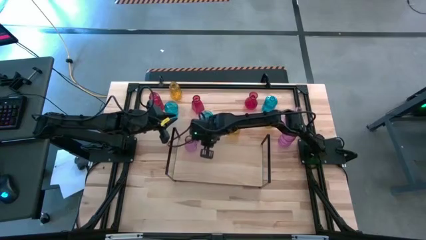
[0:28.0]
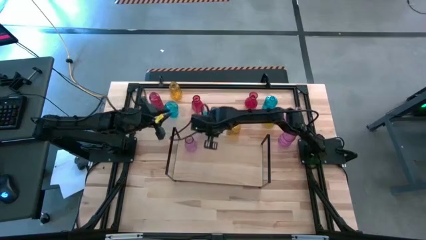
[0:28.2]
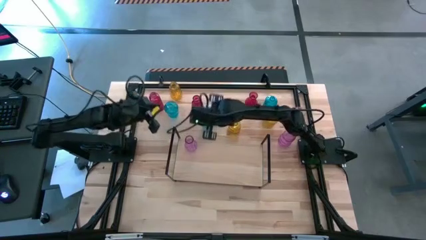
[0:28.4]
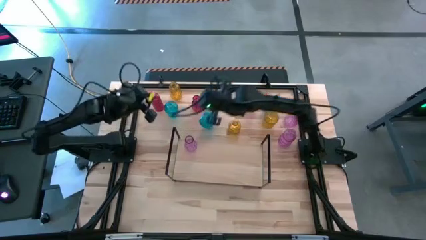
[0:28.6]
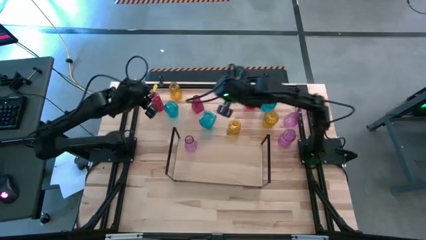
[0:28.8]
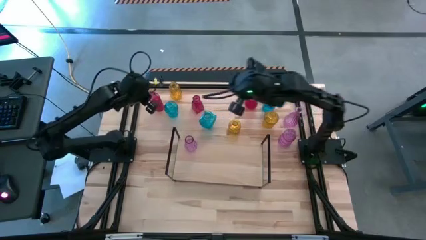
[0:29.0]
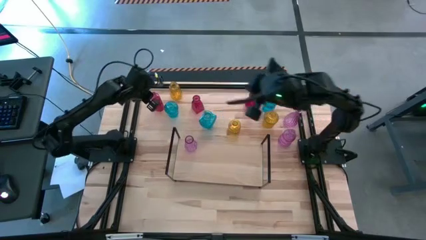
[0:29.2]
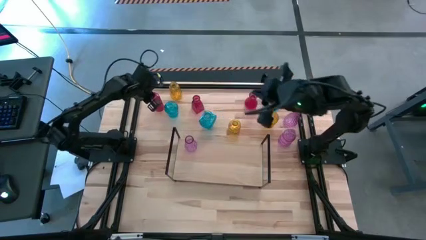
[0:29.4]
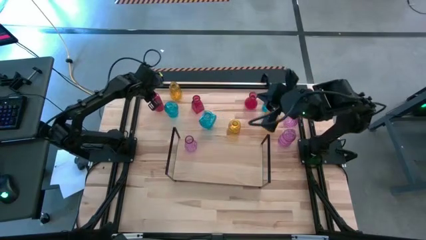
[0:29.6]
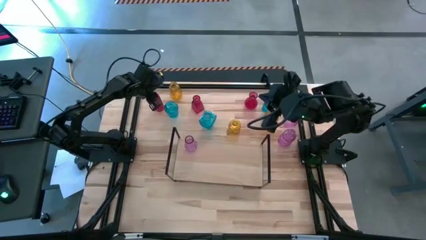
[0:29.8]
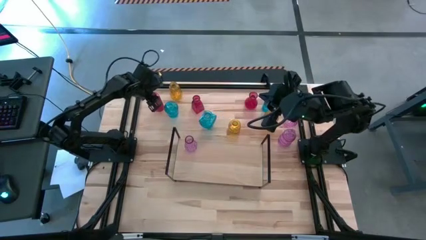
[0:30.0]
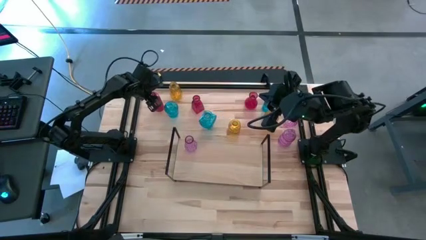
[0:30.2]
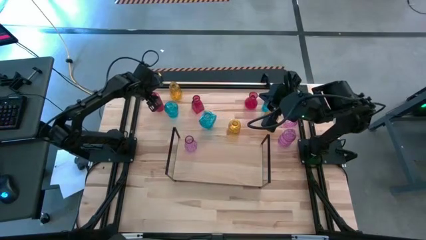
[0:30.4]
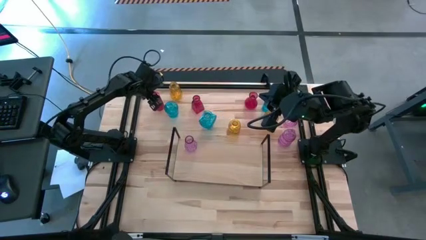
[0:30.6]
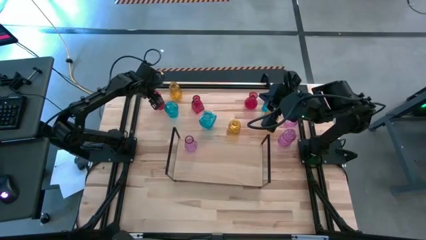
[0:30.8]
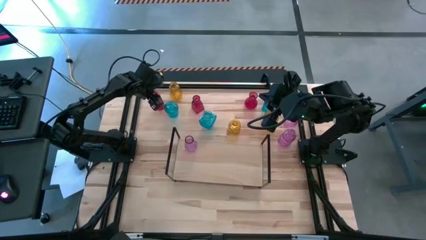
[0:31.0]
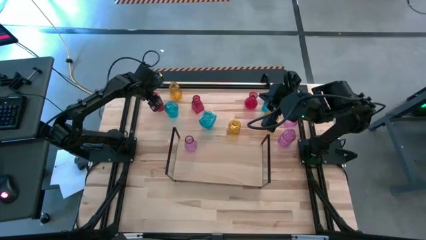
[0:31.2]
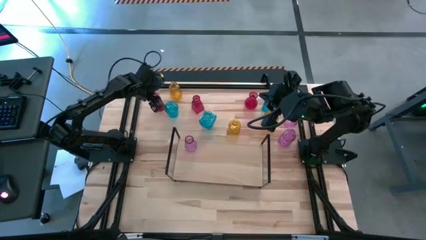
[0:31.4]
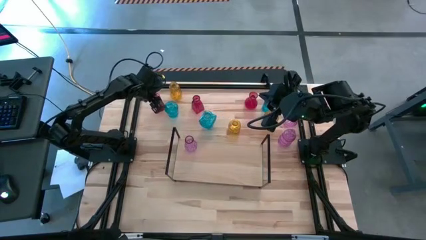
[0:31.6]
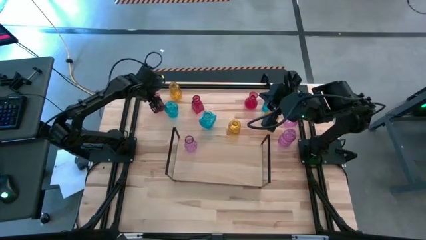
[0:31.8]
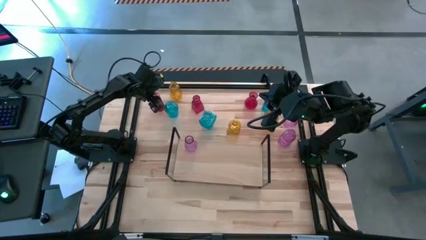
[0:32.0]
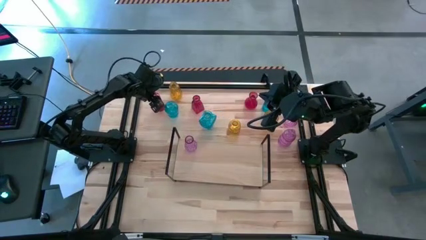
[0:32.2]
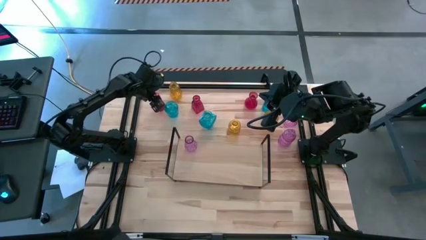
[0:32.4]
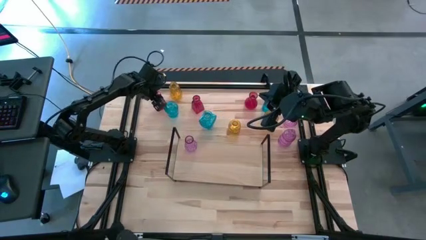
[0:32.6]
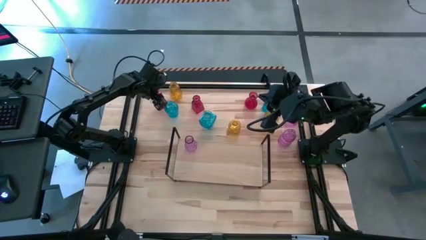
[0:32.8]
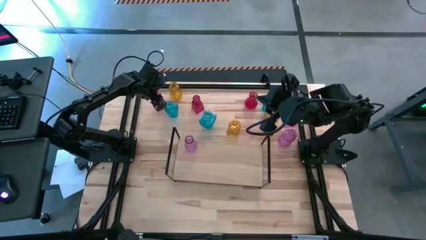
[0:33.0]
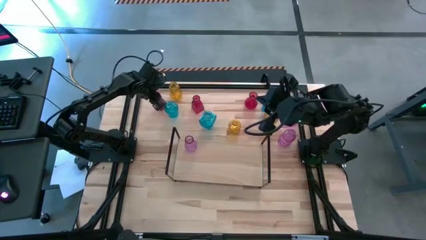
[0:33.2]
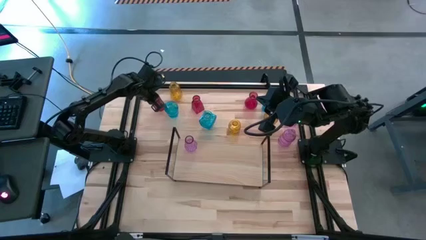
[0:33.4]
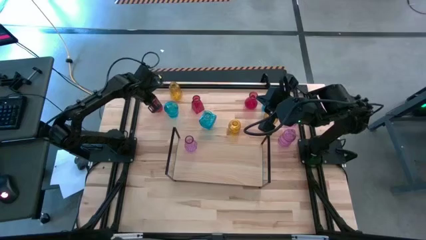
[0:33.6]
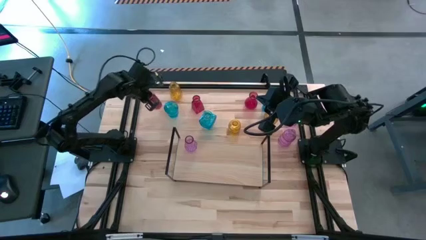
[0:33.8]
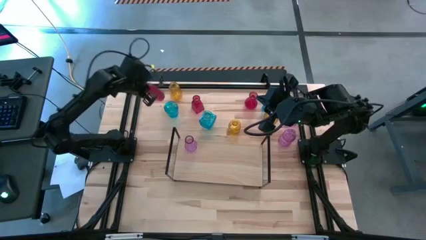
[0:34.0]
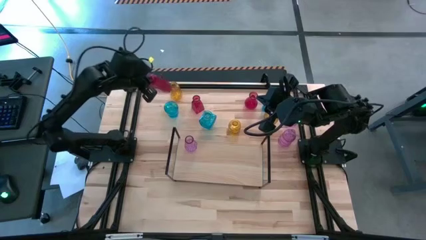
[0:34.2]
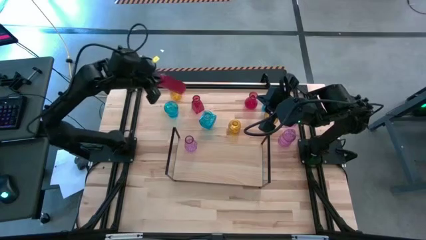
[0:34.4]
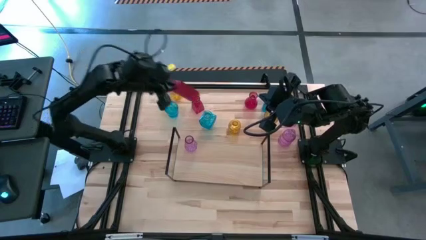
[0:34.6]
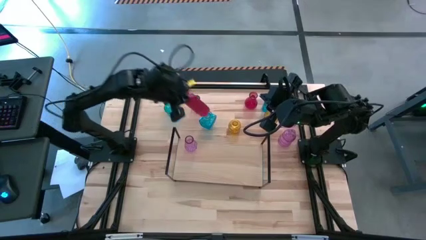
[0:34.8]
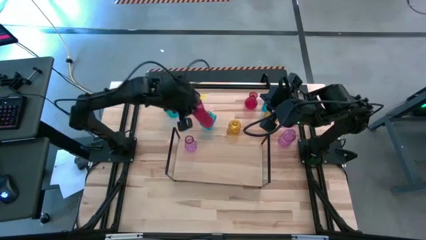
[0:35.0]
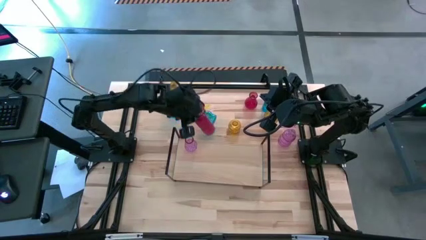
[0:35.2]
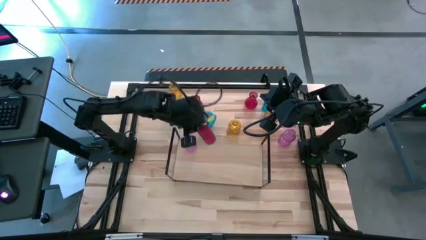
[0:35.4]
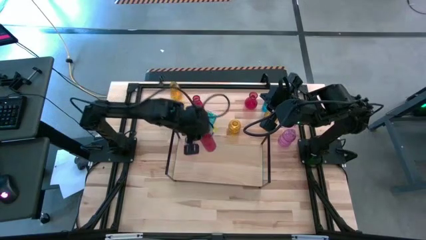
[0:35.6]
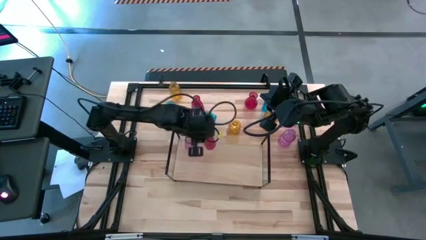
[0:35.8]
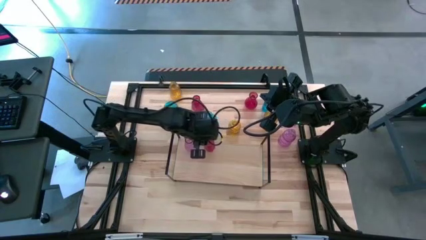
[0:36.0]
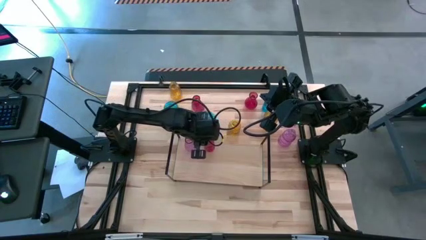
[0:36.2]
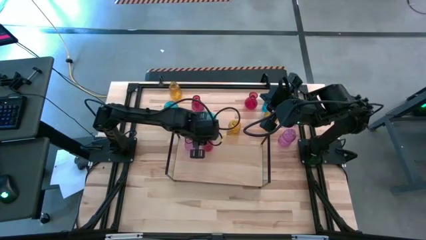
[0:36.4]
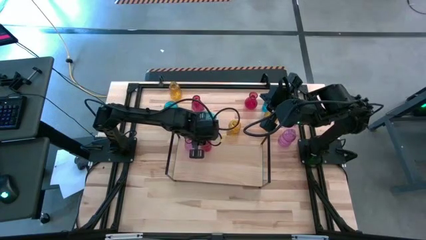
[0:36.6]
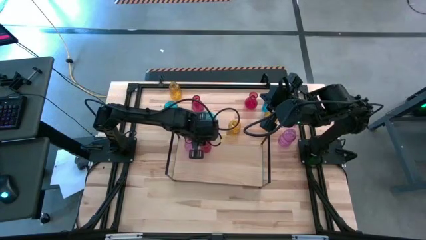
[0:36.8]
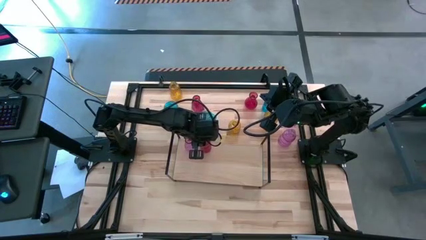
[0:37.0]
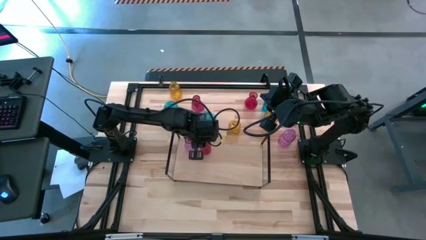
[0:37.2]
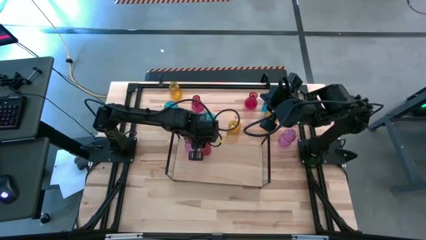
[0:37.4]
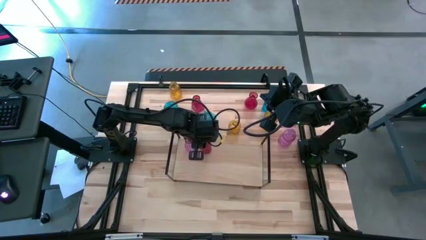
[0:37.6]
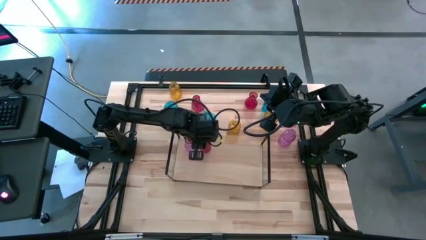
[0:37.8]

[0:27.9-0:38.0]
Task: sort vases onto shelf
Put the left red vase on the shelf

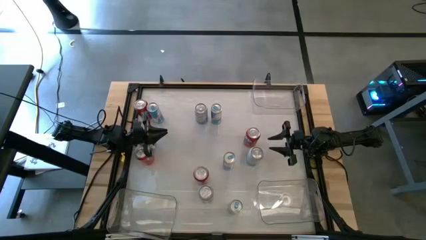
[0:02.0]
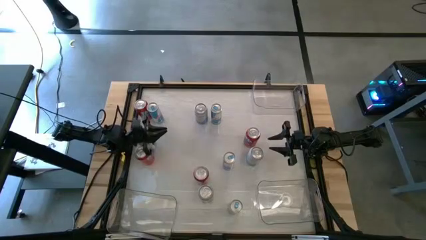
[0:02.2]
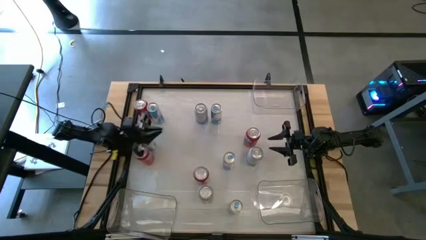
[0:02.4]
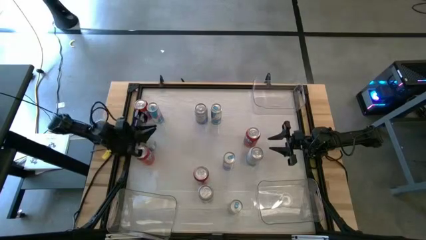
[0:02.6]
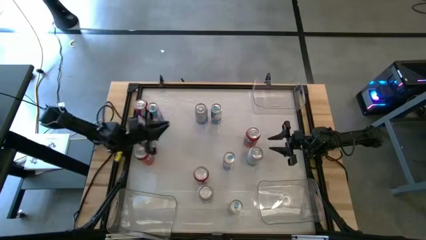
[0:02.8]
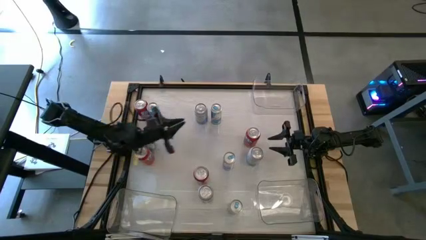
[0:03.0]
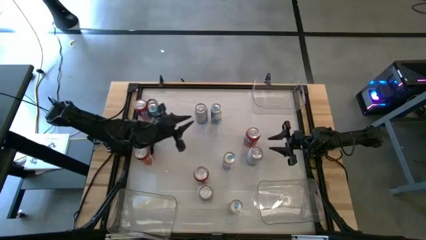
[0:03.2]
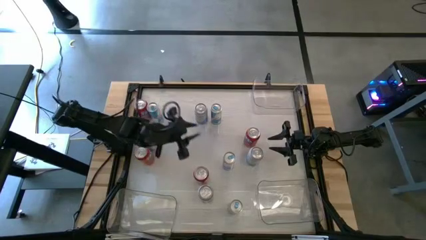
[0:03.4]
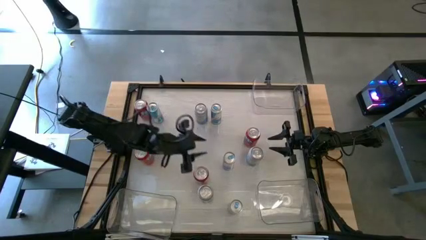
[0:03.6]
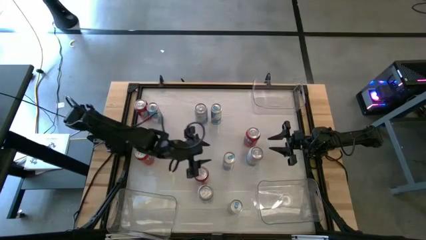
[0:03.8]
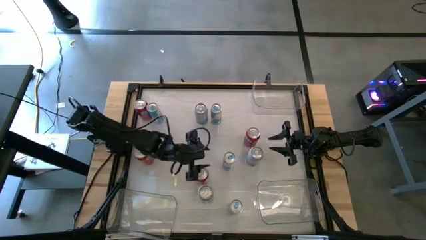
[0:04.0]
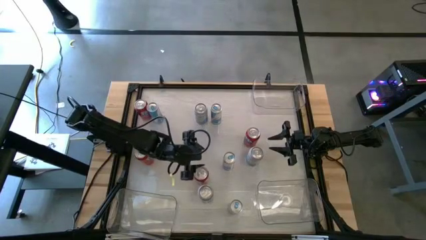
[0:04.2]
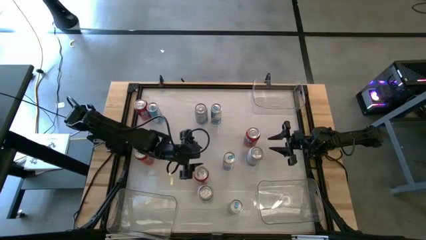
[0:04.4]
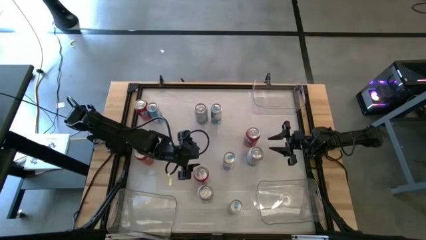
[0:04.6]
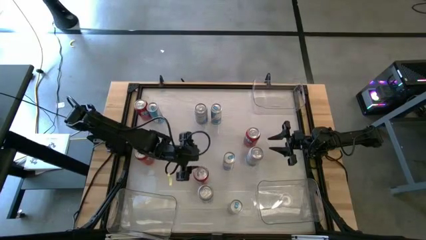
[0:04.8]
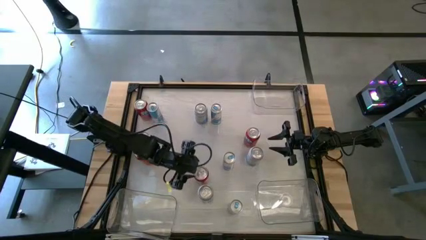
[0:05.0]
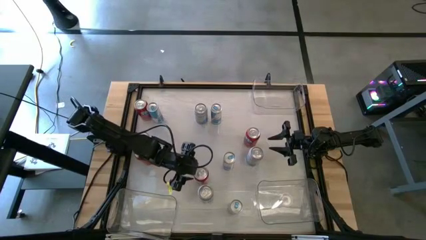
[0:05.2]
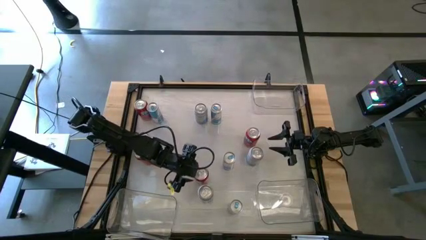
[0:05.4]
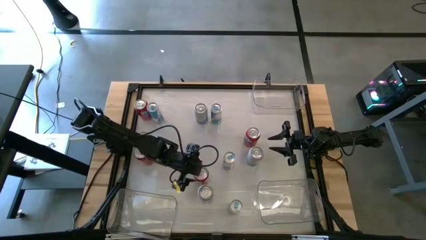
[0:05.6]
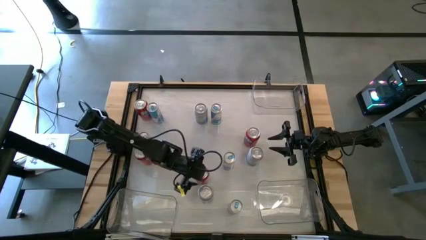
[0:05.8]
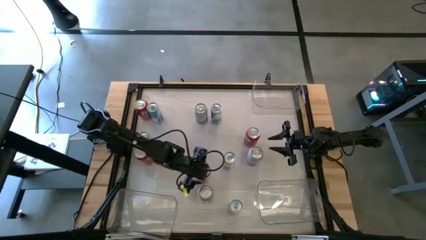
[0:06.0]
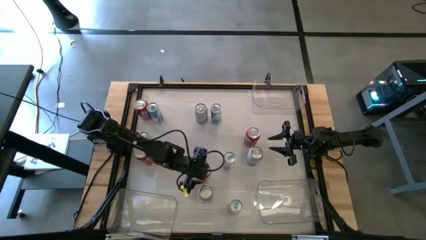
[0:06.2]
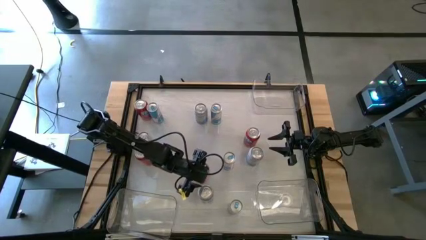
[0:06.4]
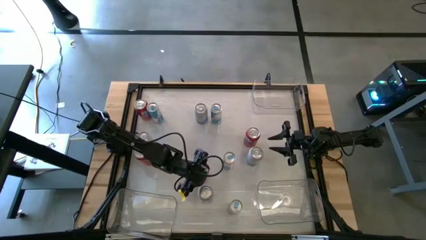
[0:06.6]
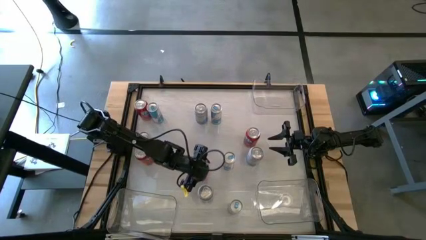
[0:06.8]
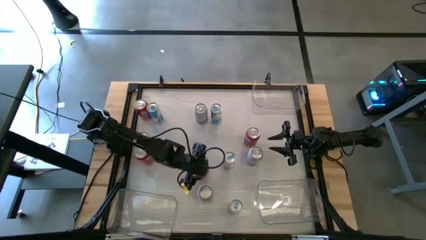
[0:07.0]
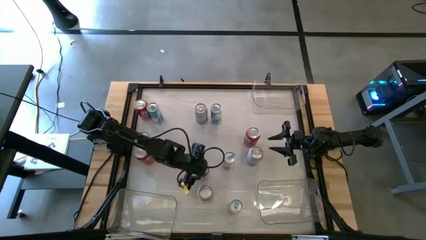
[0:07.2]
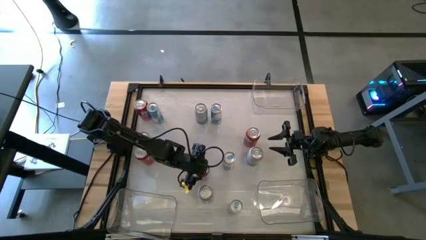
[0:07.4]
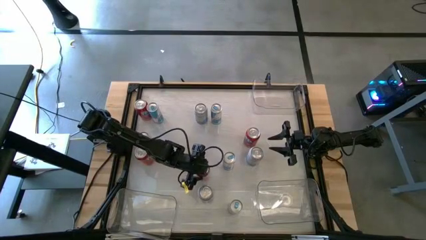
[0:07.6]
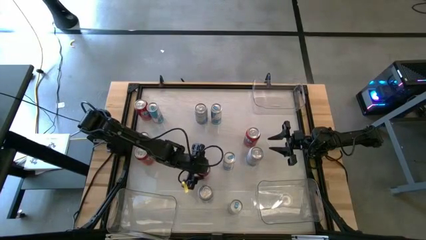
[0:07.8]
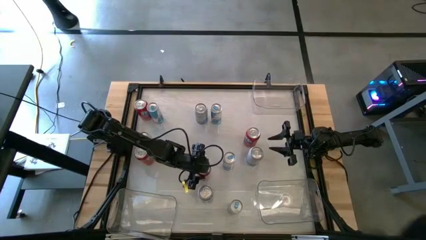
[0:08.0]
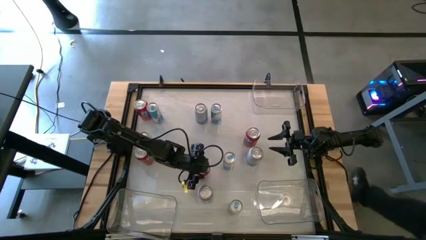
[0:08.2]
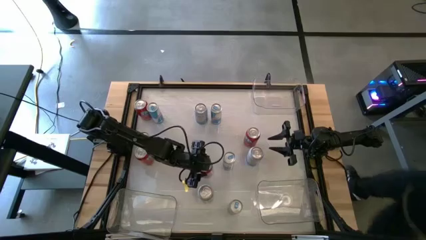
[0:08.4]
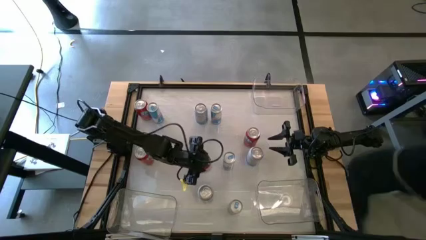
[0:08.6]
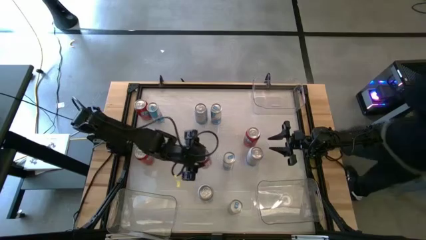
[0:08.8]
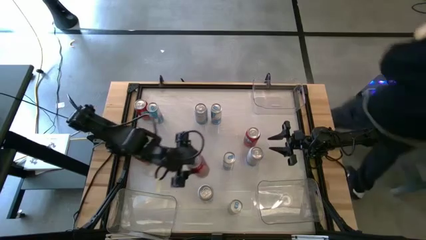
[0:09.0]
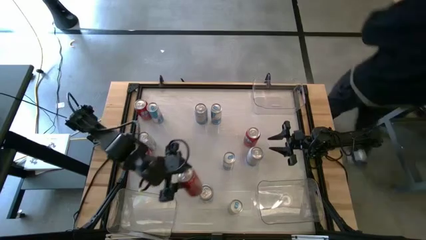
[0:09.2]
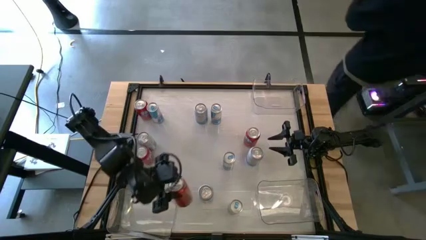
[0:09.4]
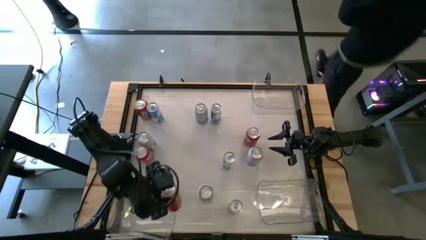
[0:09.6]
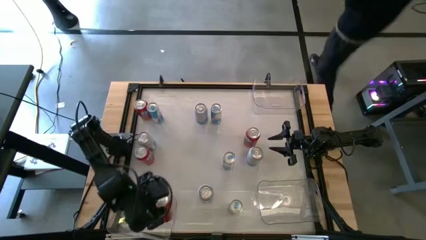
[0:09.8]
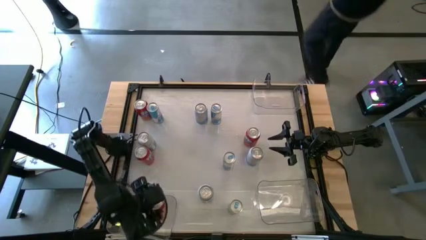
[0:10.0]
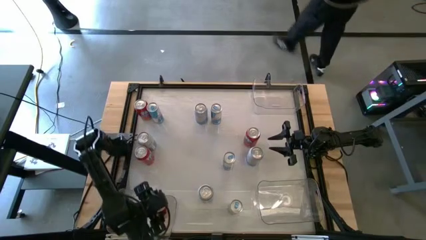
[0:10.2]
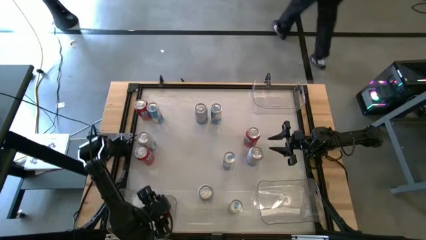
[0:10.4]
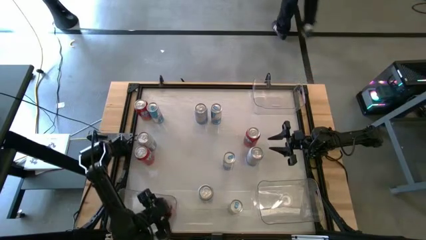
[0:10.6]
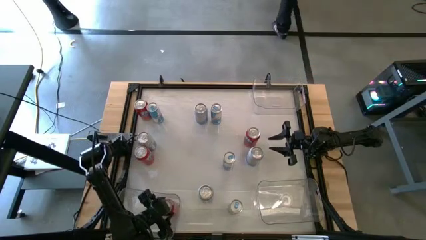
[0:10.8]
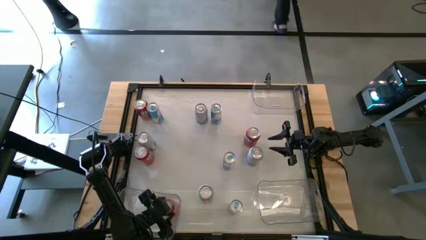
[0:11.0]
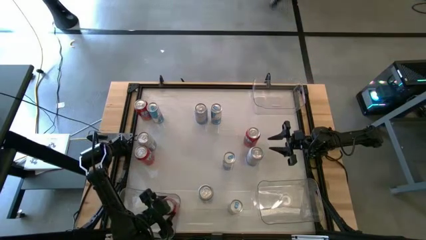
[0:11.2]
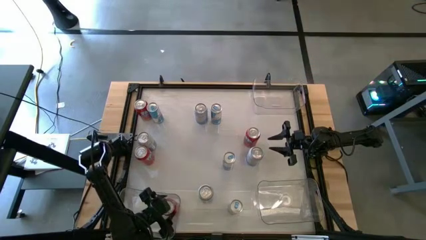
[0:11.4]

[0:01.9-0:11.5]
Task: Sort soda cans
Put the bottom right orange soda can into the bottom left transparent bin
